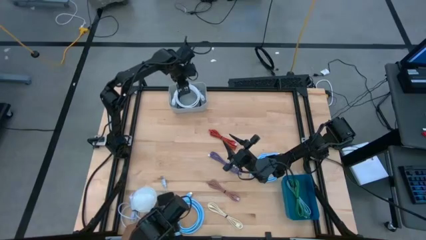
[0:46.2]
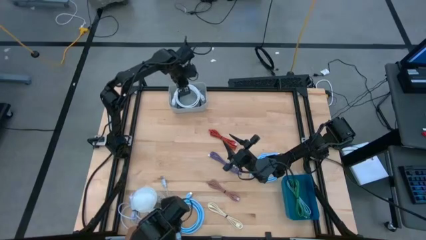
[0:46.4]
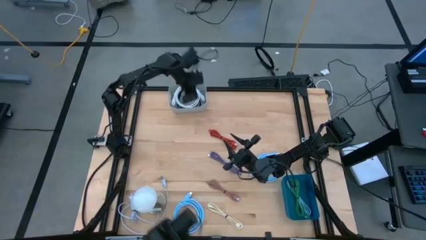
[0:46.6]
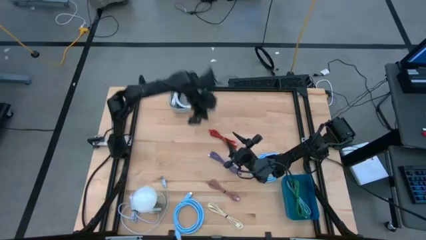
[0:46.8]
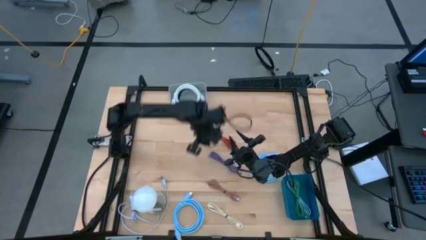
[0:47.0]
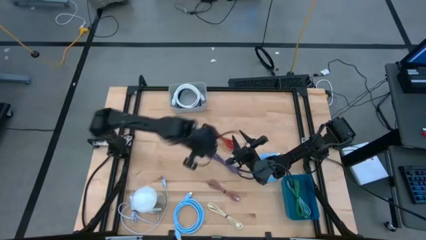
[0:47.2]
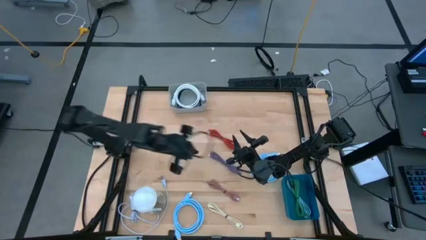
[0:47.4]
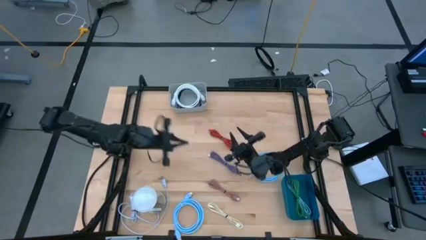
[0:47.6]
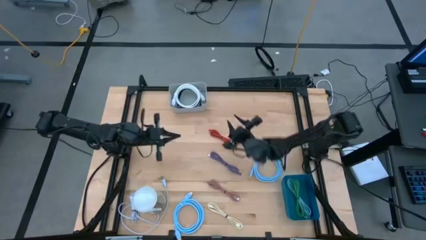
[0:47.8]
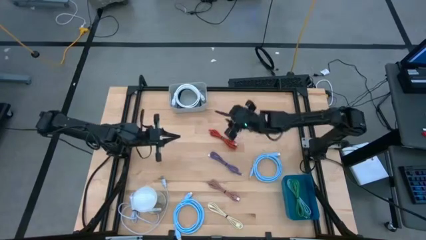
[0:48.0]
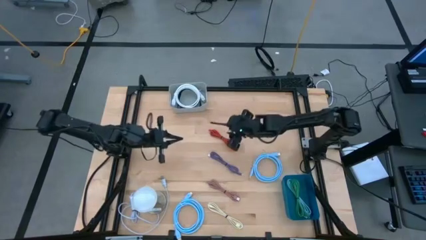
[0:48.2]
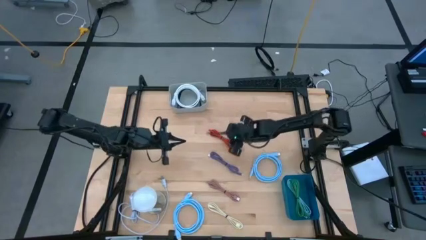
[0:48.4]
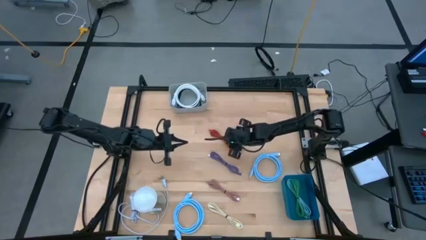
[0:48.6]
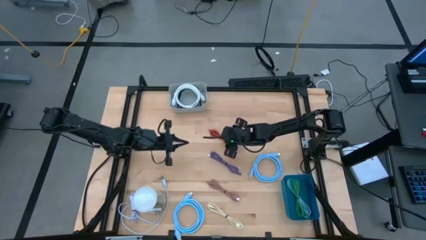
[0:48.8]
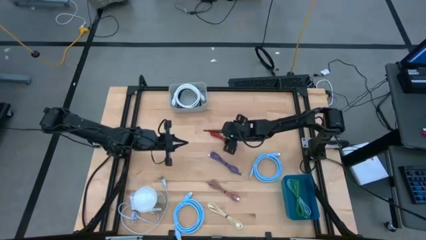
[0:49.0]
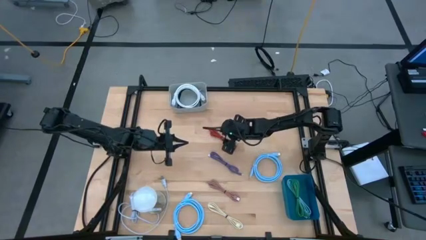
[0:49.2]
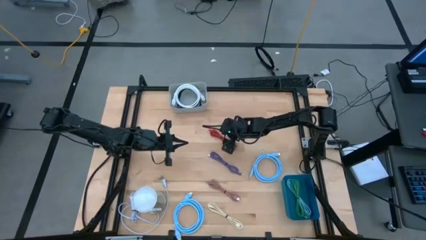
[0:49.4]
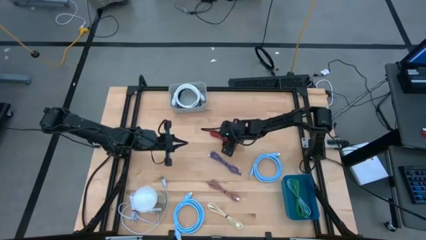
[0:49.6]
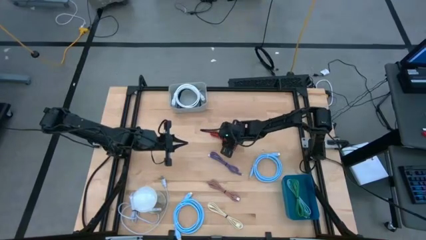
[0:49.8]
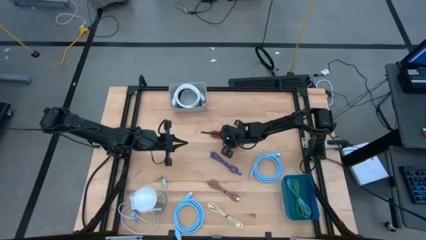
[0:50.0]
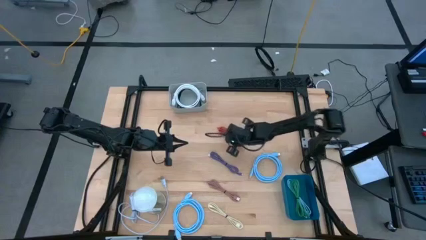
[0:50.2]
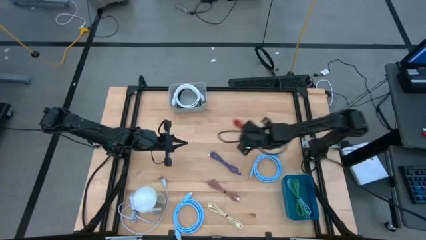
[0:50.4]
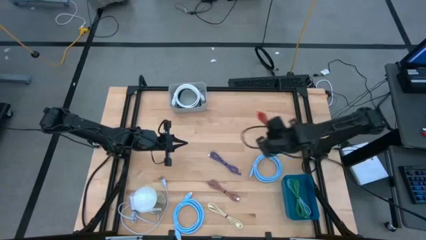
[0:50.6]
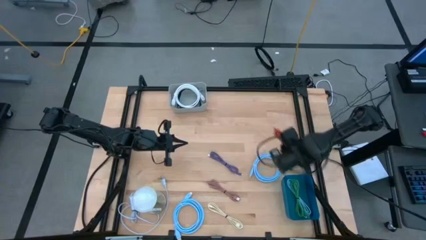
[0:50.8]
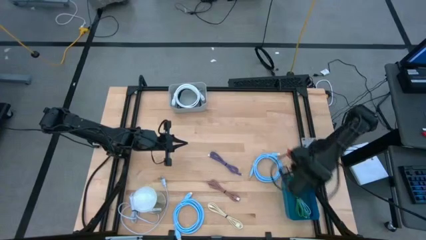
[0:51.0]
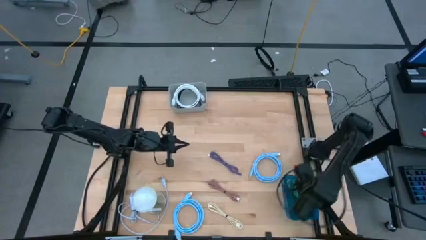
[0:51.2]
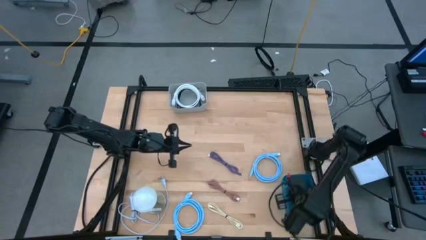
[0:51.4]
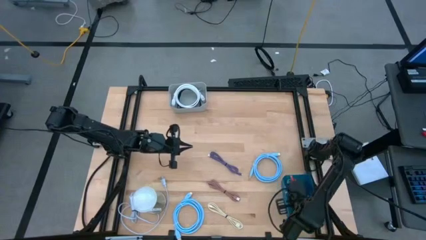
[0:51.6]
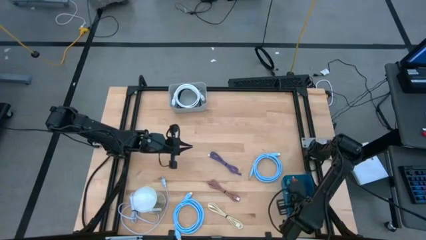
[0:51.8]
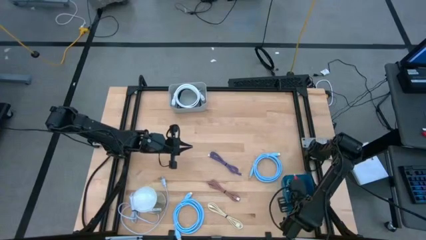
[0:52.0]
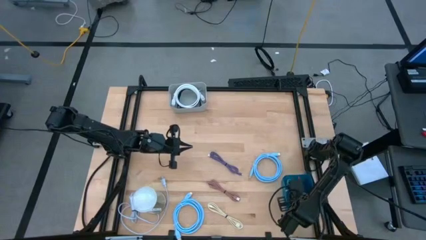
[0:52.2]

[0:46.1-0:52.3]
Task: Pick & Place USB Port
Put the orange USB cable into the blue bin

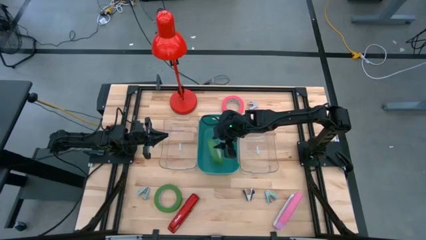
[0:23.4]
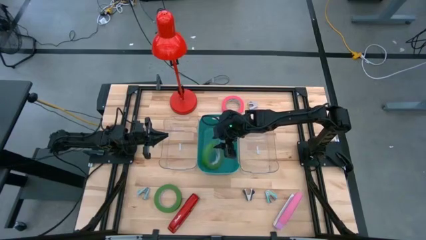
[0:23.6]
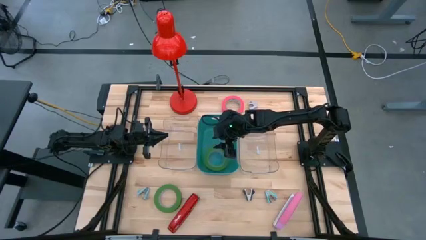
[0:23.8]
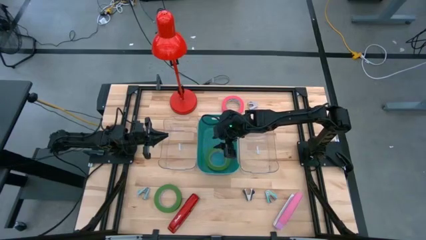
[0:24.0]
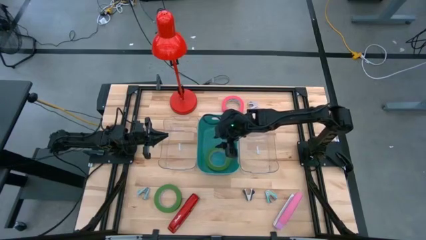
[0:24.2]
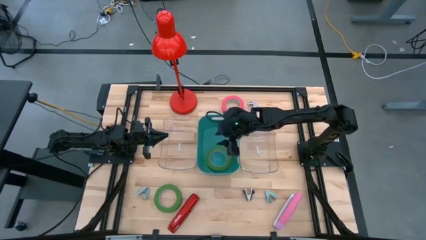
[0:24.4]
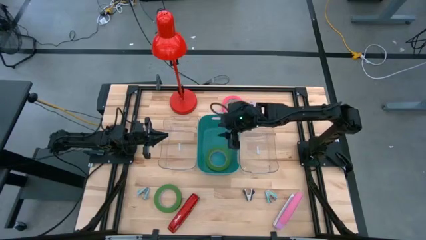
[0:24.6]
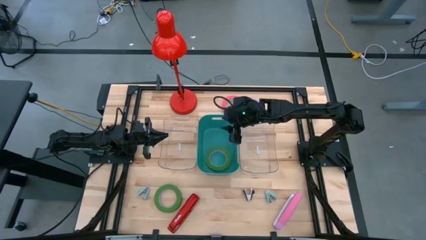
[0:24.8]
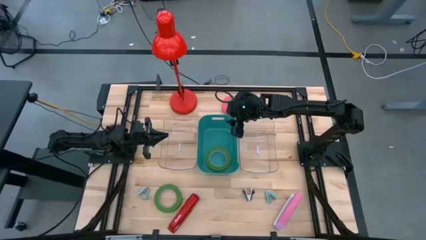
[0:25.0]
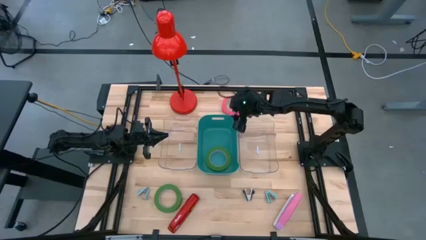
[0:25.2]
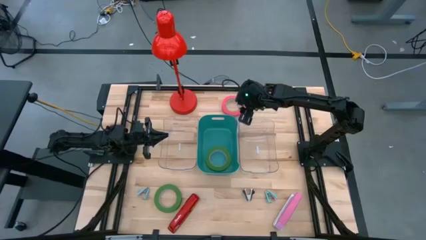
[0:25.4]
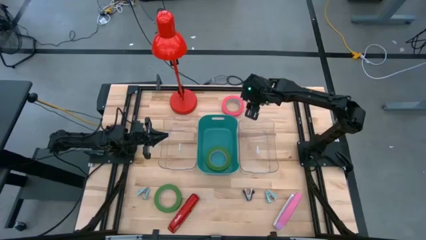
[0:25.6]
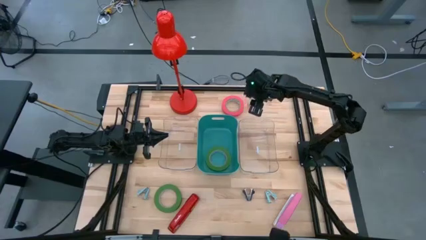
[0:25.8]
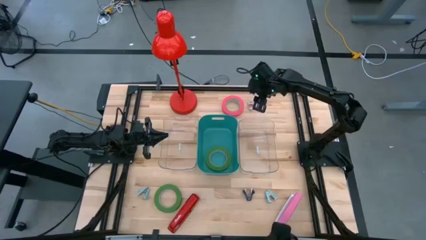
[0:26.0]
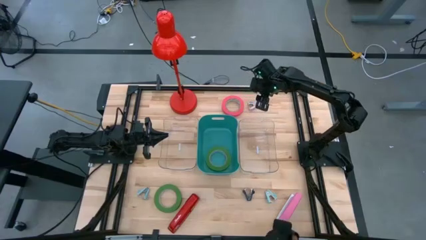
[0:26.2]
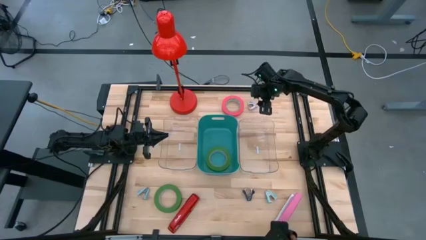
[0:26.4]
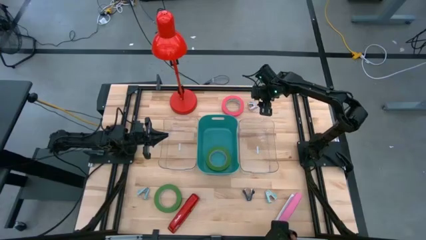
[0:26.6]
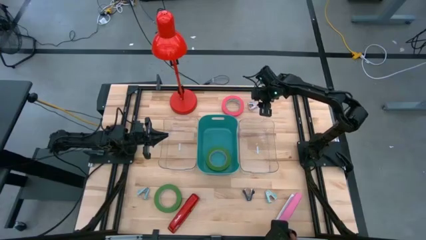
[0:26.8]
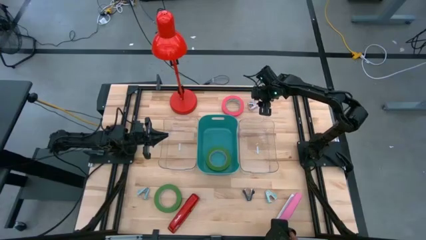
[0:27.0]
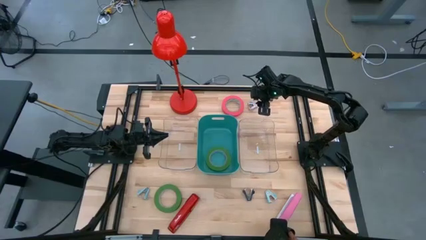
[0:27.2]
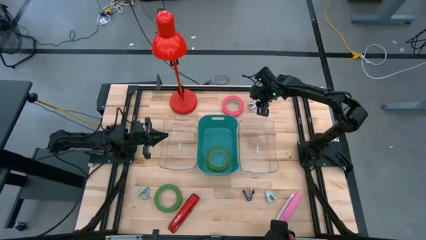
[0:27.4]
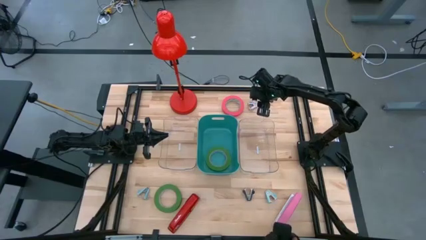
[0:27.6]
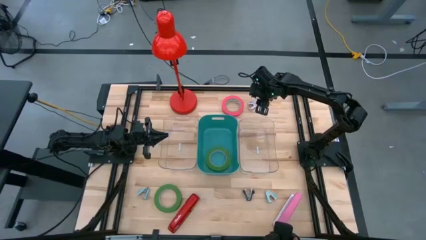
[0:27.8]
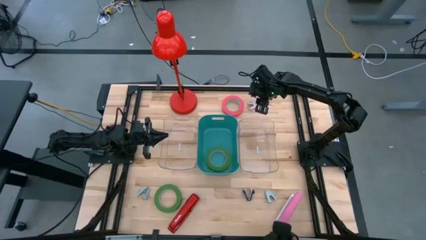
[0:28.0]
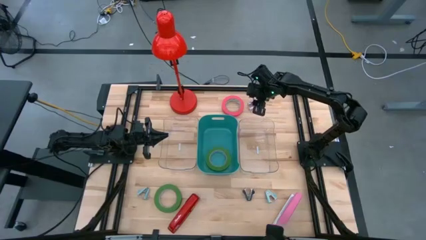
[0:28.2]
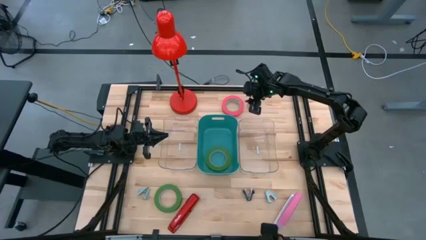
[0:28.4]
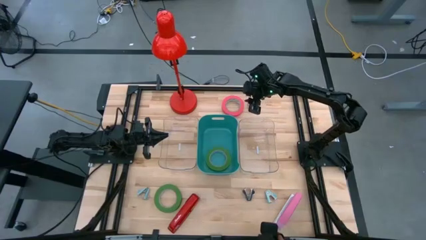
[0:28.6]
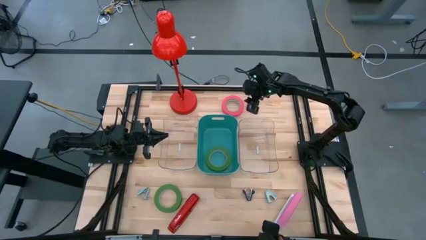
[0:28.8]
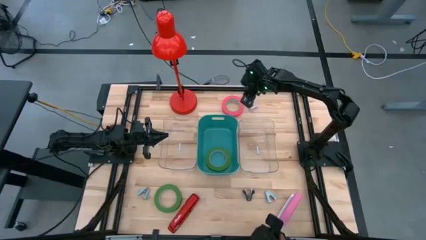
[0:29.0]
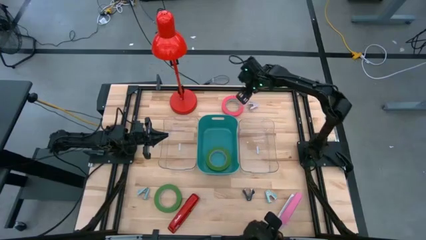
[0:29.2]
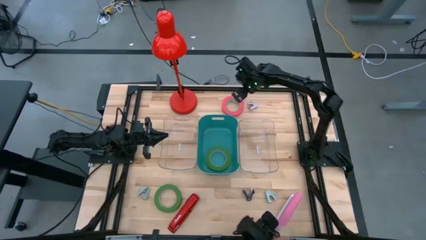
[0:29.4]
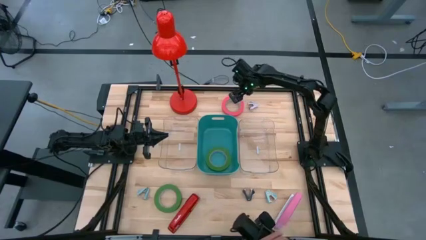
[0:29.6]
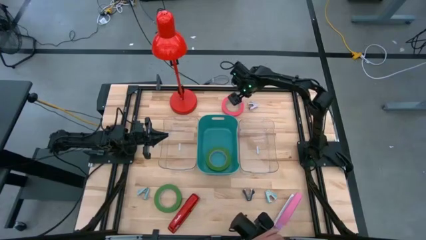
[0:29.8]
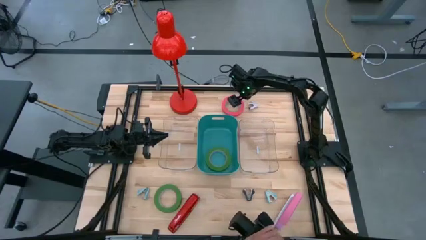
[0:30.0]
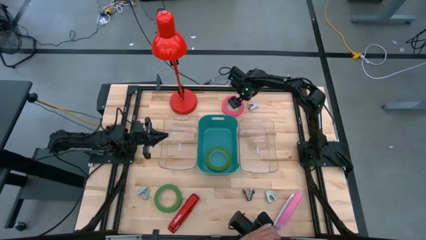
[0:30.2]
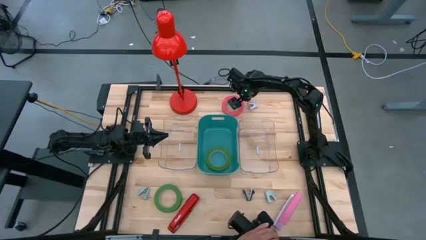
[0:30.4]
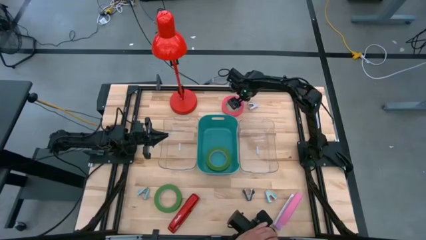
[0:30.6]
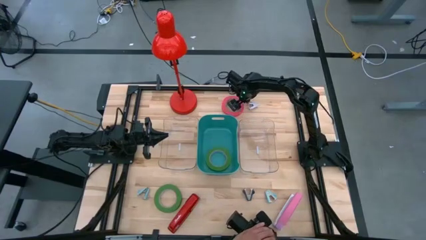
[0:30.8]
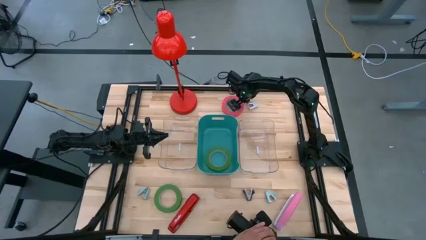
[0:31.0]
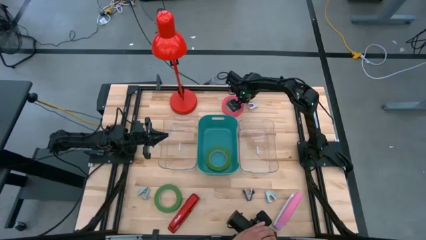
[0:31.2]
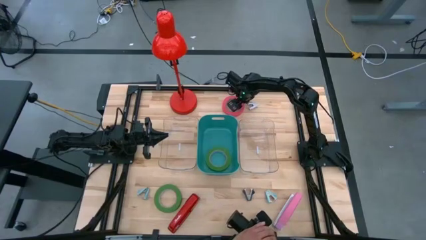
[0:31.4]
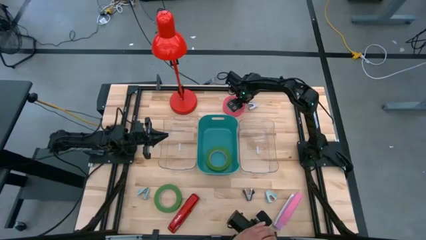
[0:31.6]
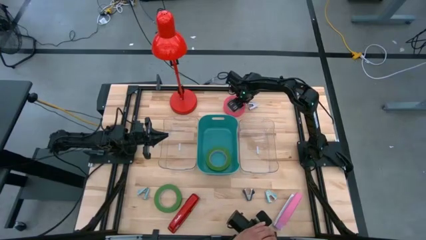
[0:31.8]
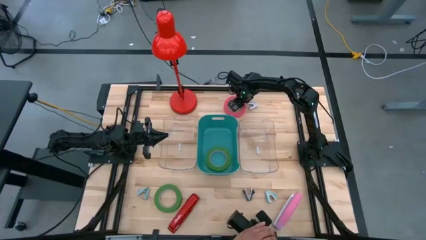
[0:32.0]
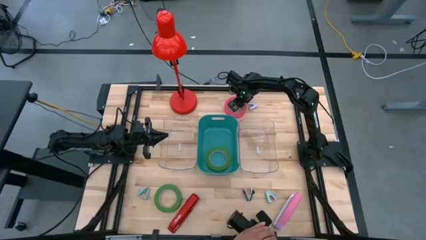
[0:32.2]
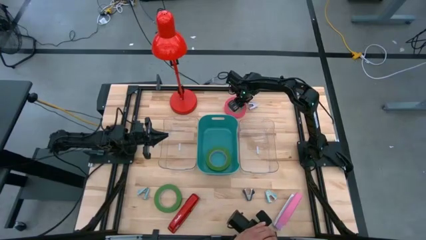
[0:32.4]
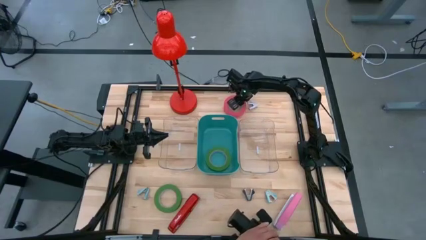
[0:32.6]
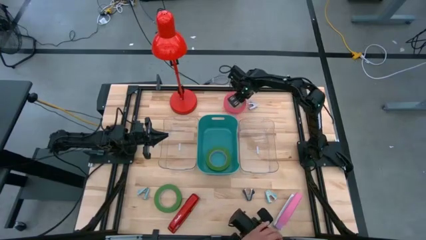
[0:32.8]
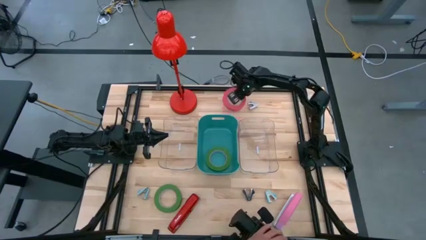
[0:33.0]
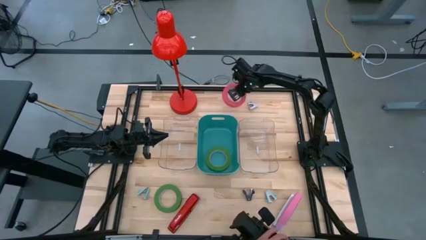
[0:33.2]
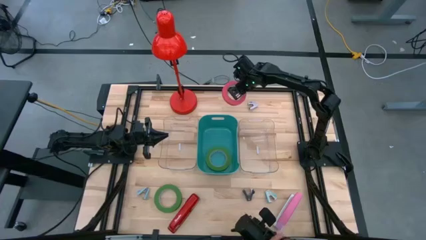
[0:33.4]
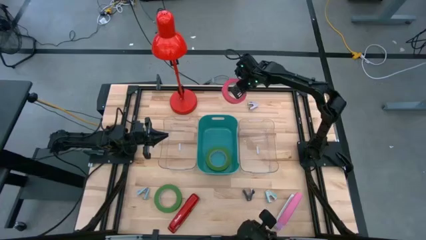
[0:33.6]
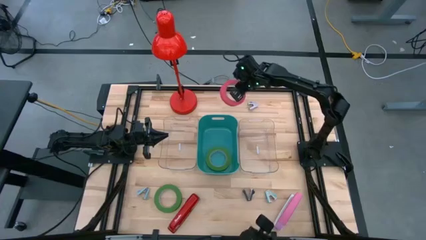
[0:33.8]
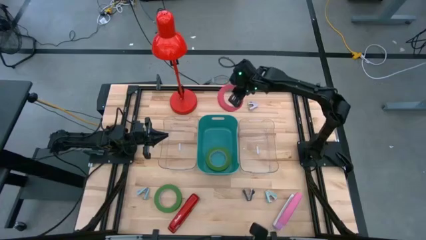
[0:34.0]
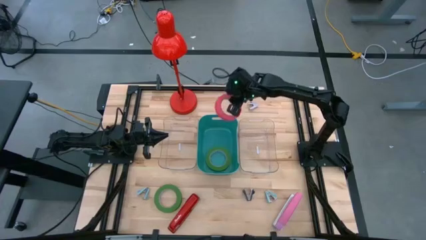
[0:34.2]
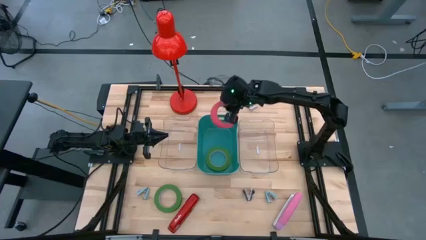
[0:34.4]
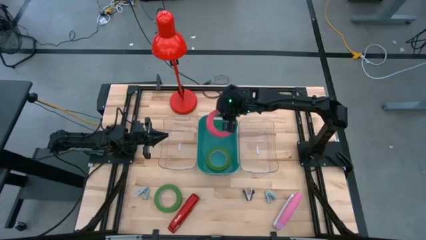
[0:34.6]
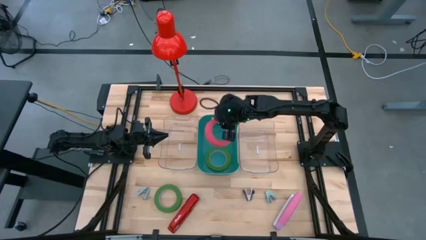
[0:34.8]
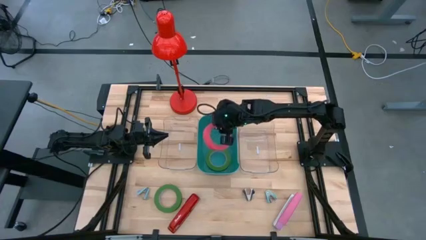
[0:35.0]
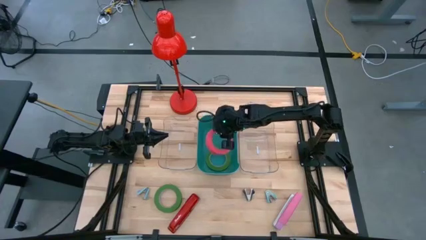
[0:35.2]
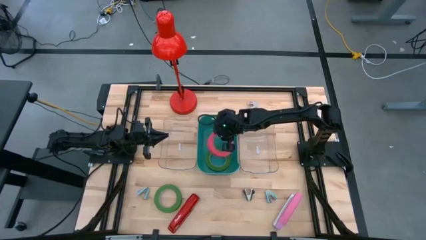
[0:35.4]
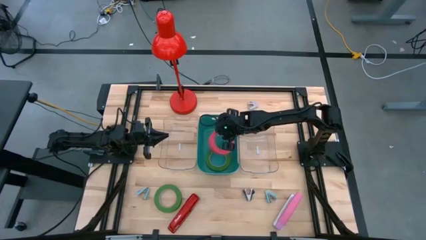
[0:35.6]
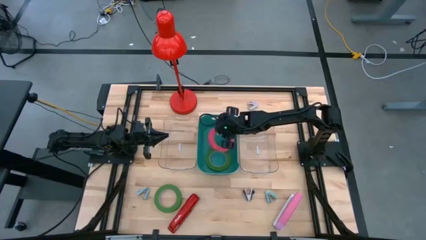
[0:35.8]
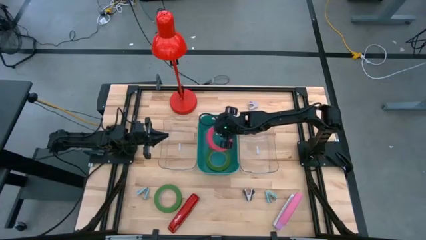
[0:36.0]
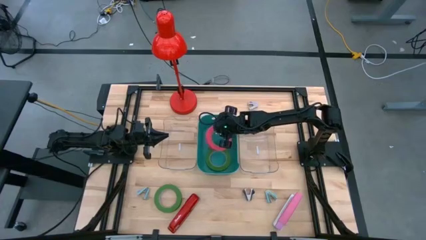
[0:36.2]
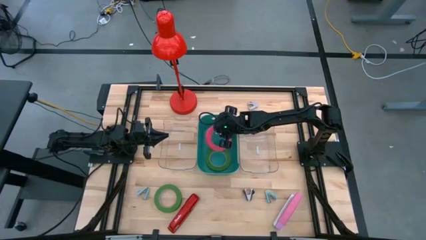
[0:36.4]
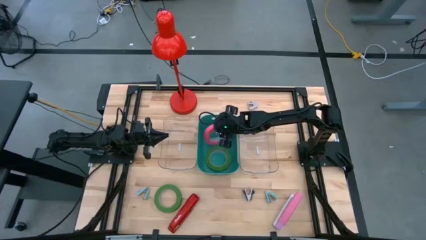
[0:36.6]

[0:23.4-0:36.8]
Task: Pick and place Stapler, Stapler remover, tape
Put the pink tape into the green bin
